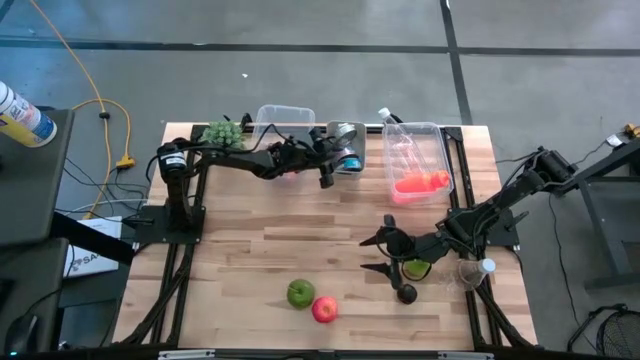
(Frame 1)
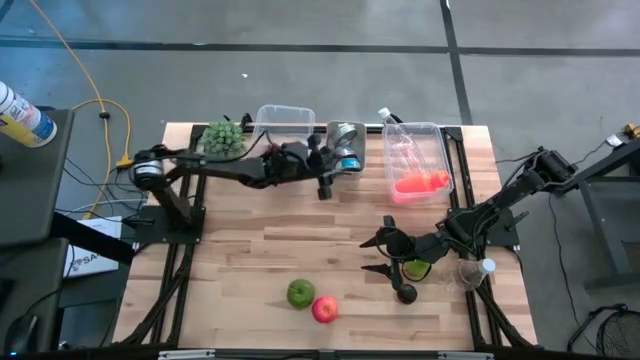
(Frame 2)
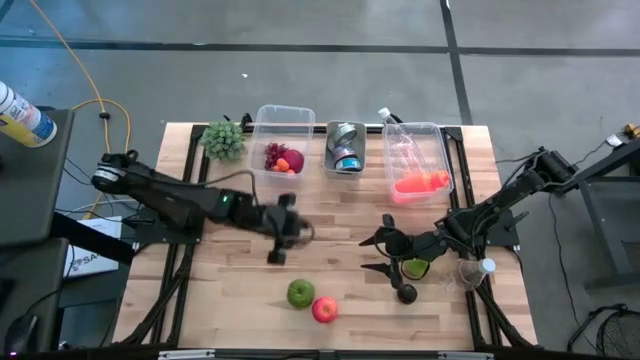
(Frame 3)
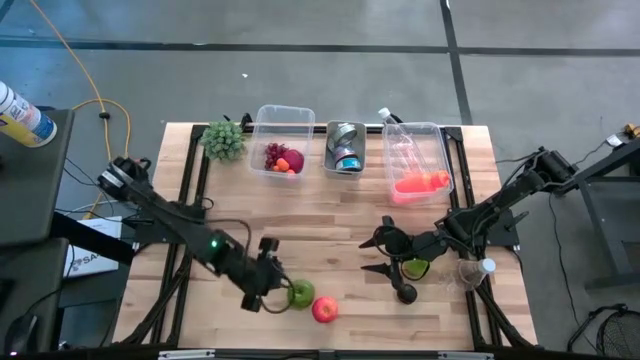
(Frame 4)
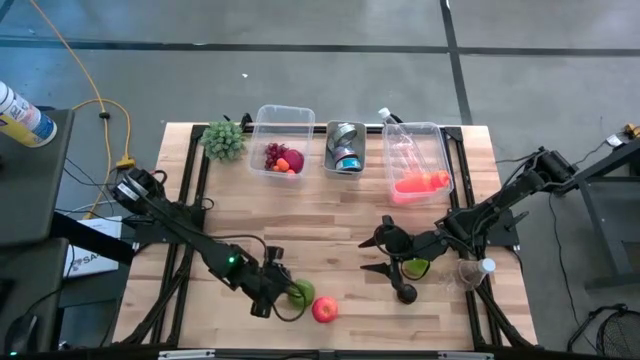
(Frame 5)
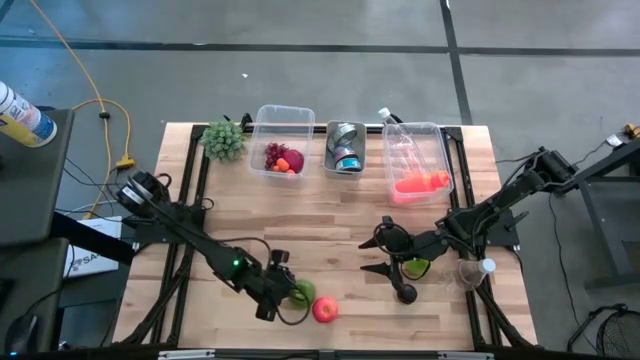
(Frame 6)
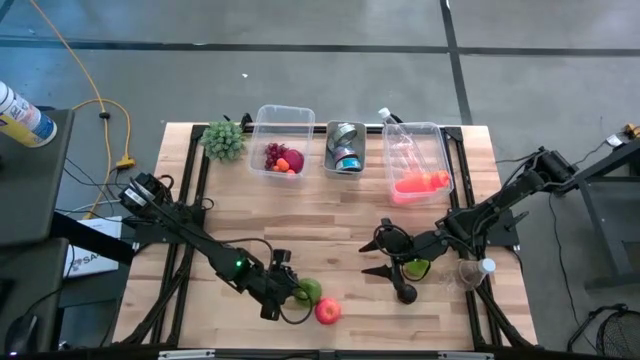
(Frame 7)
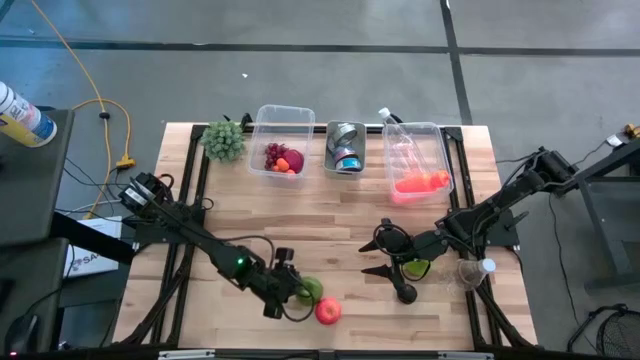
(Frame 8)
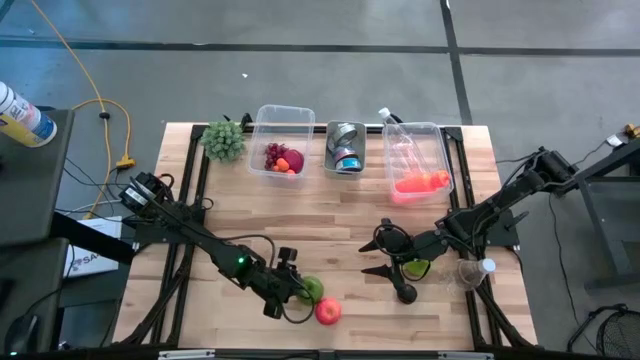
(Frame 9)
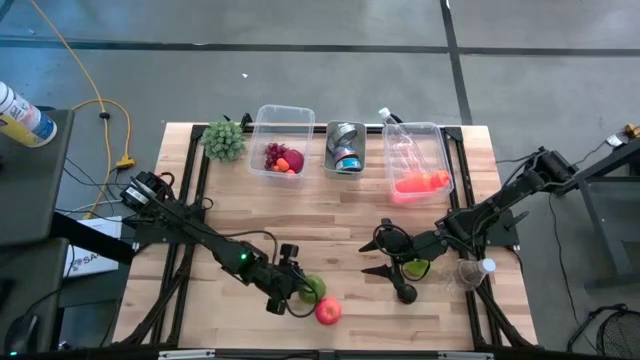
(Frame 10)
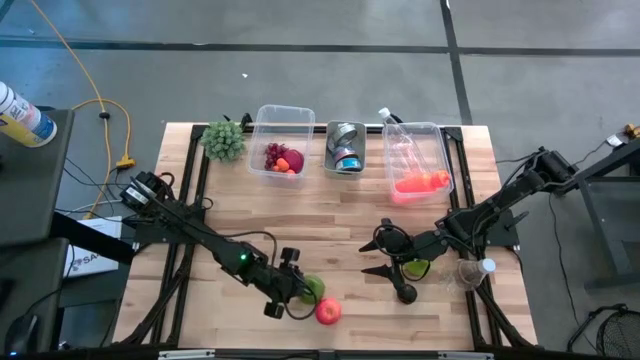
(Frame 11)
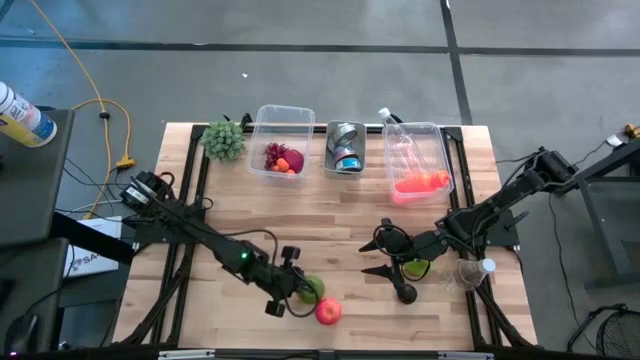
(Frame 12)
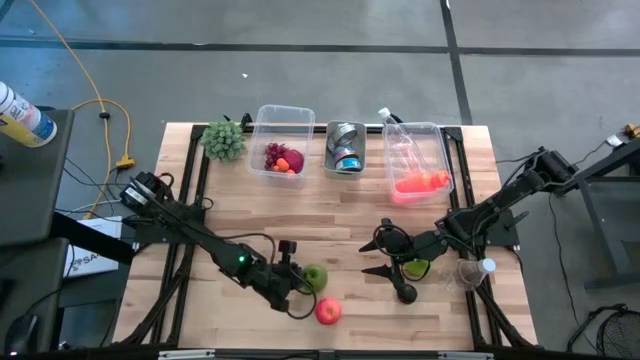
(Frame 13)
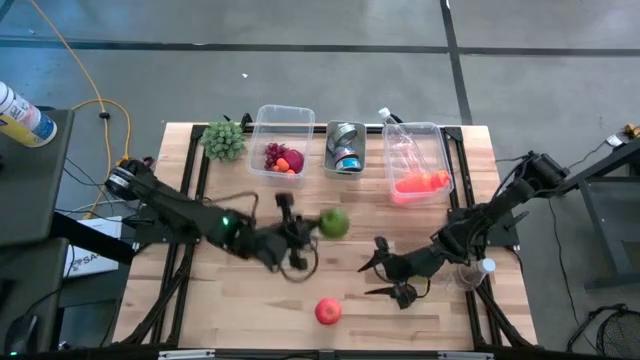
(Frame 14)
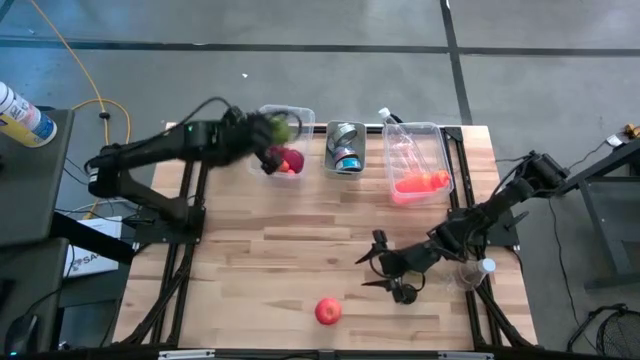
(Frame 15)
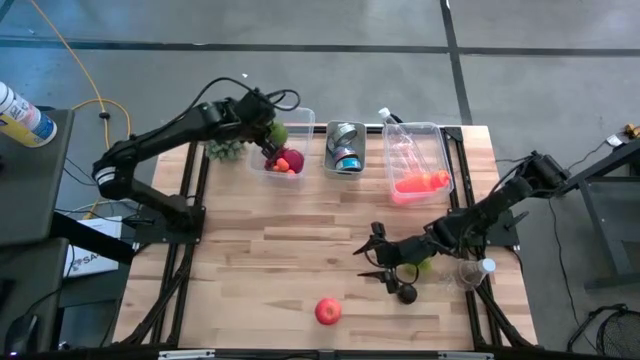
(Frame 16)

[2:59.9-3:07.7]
Task: Pick & Place Food Item
Put the green apple into the left transparent bin

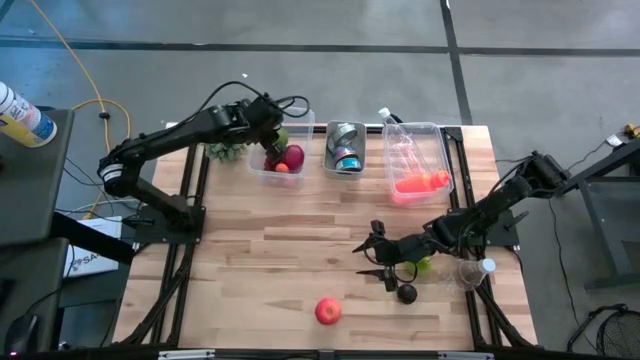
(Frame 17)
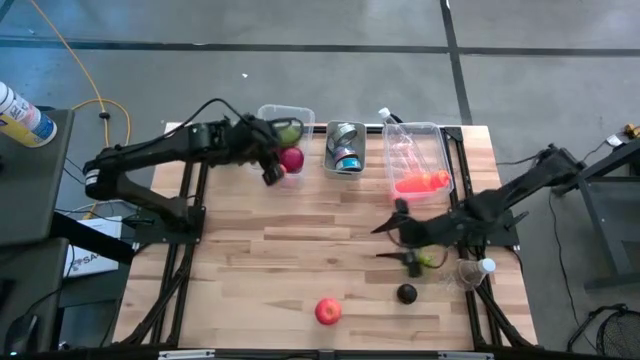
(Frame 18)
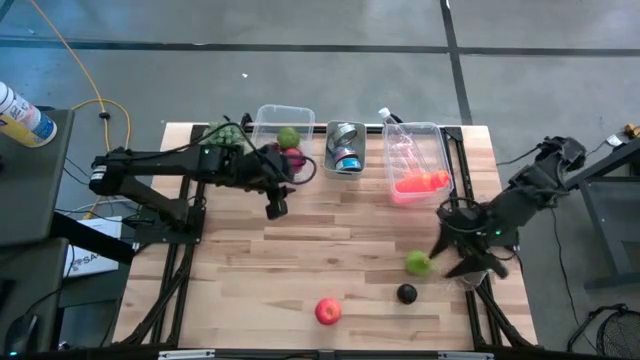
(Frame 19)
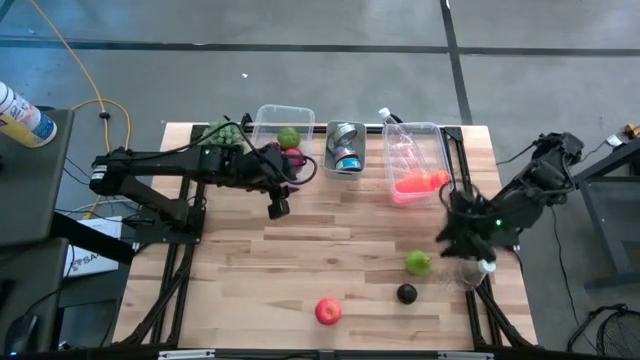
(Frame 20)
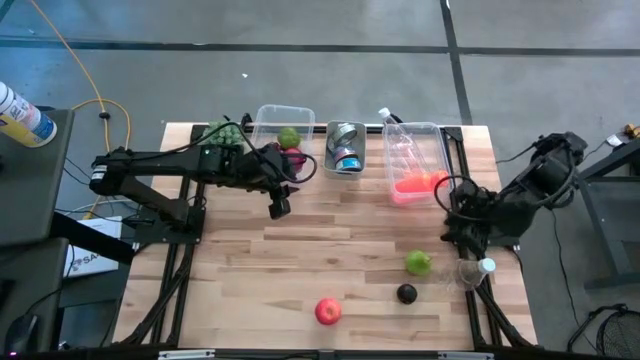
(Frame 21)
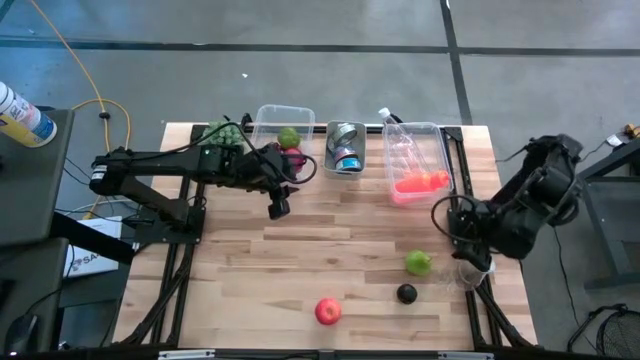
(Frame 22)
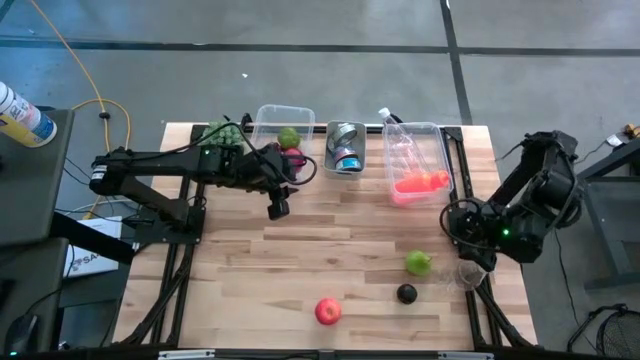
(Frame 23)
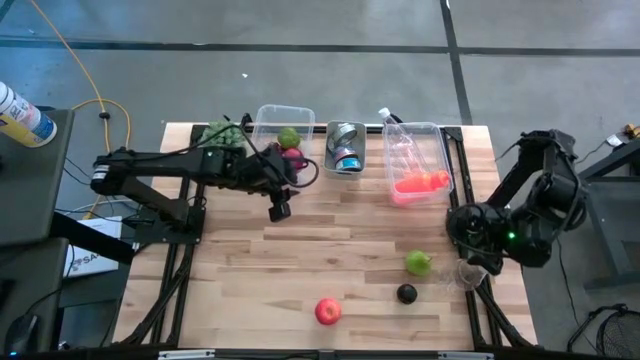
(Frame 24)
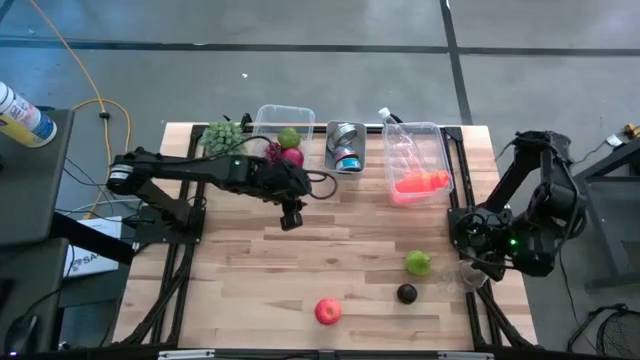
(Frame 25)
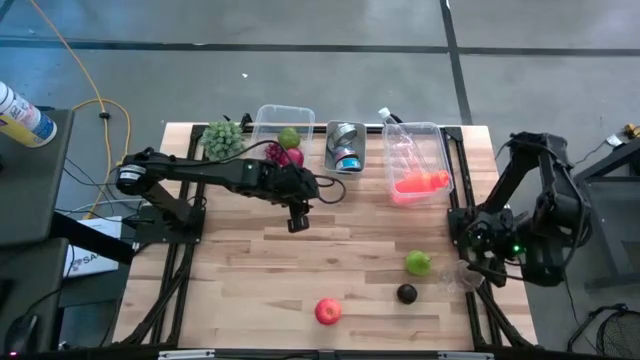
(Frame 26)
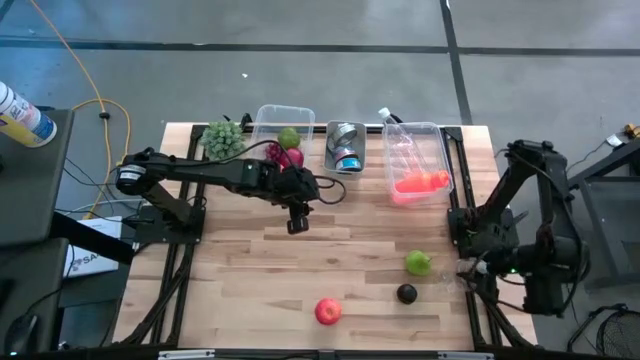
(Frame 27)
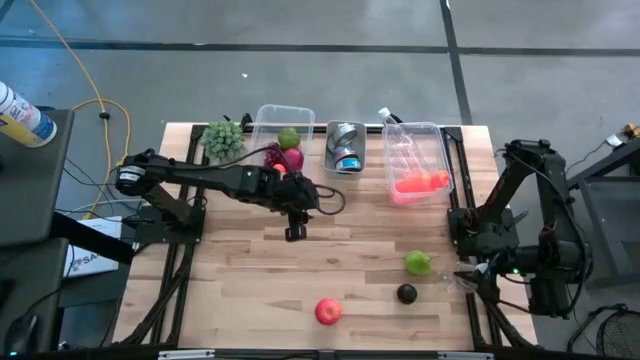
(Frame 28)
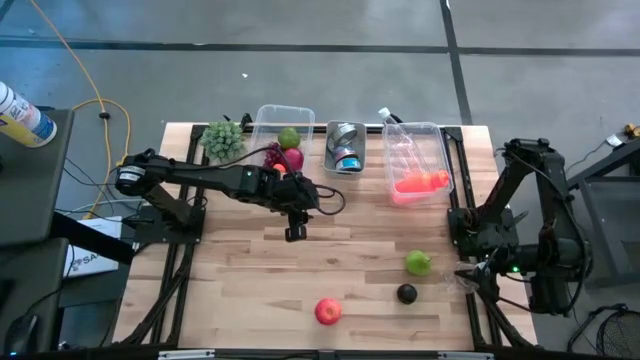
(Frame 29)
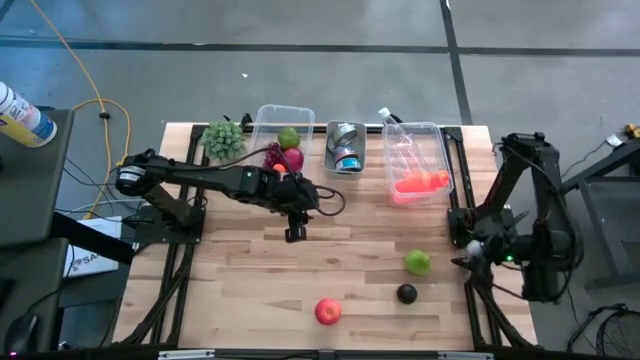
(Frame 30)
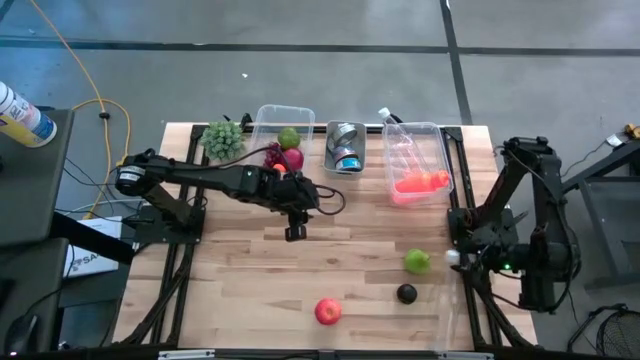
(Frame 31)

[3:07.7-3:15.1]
Put the transparent water bottle into the right transparent bin
